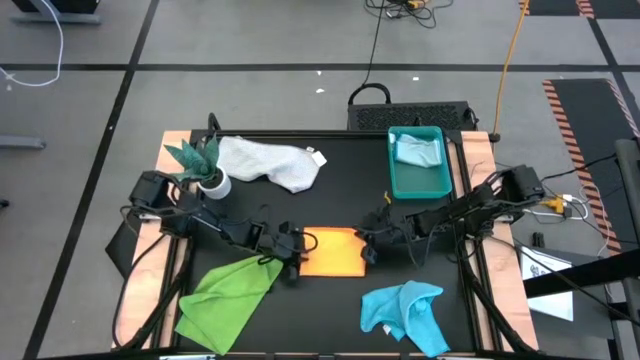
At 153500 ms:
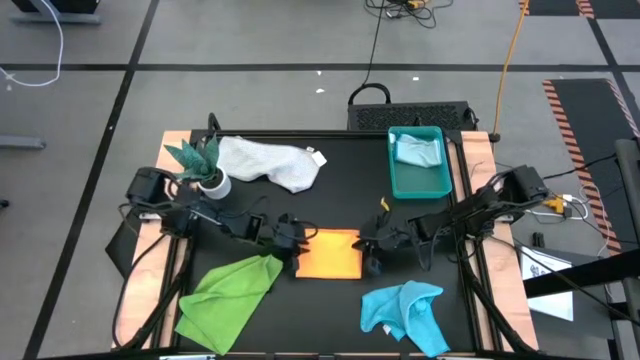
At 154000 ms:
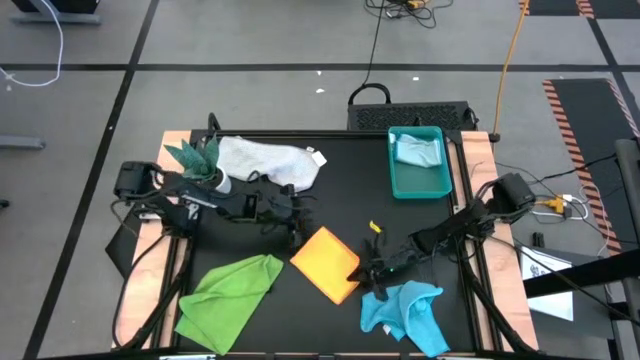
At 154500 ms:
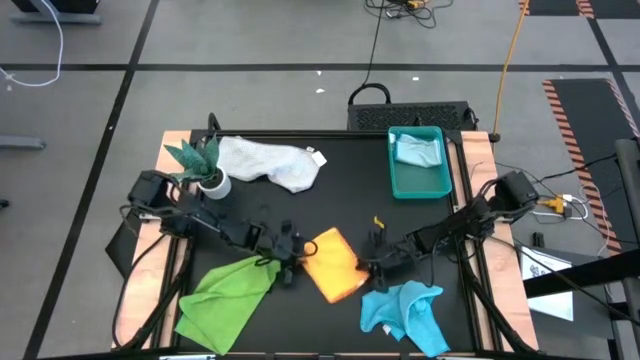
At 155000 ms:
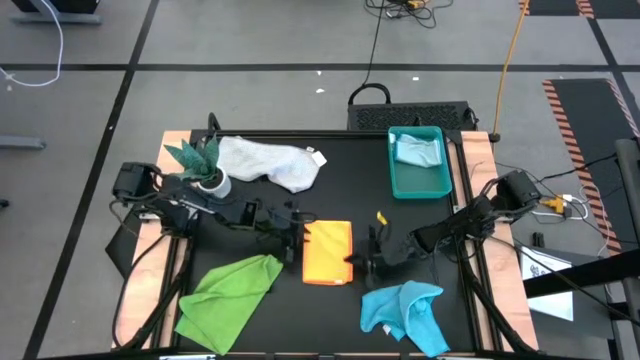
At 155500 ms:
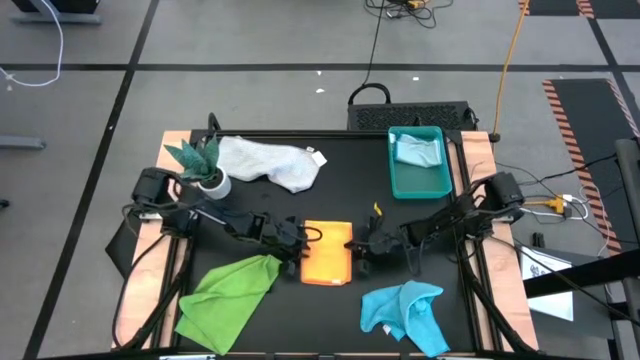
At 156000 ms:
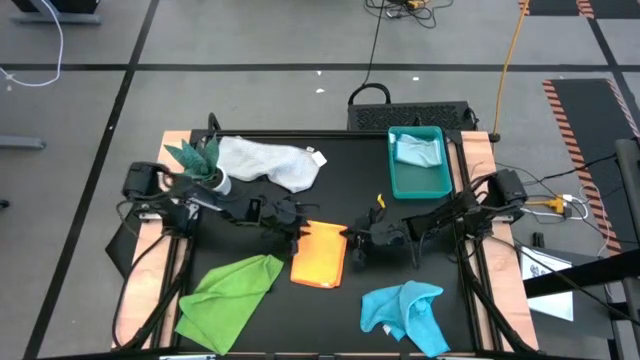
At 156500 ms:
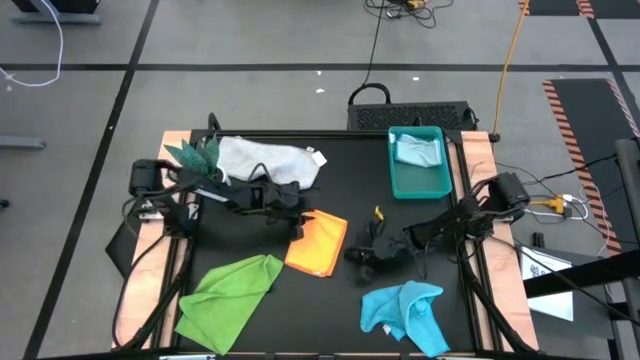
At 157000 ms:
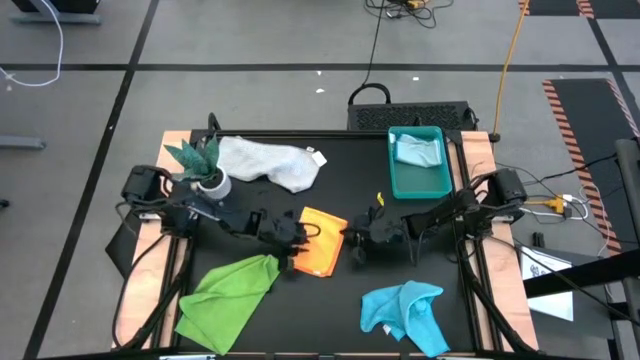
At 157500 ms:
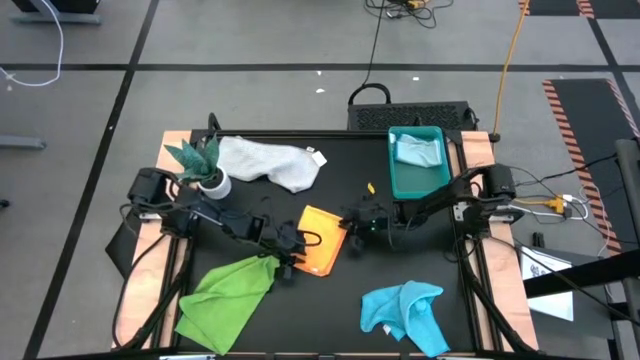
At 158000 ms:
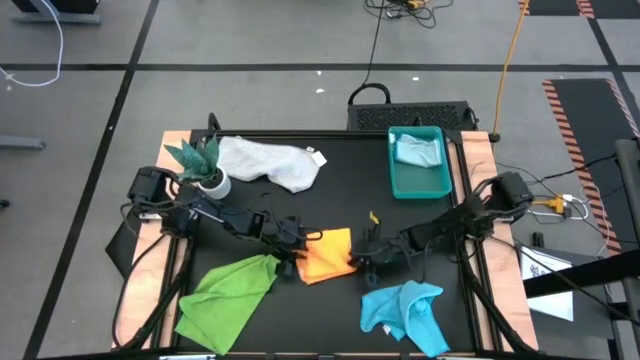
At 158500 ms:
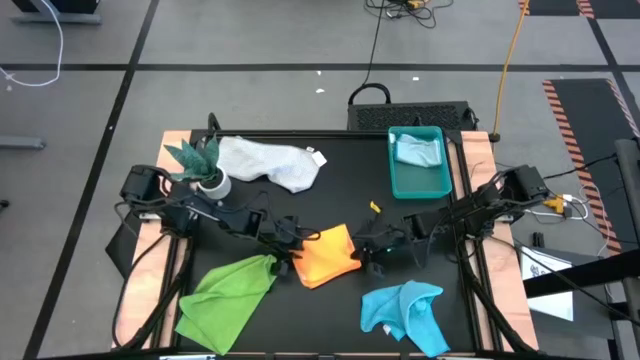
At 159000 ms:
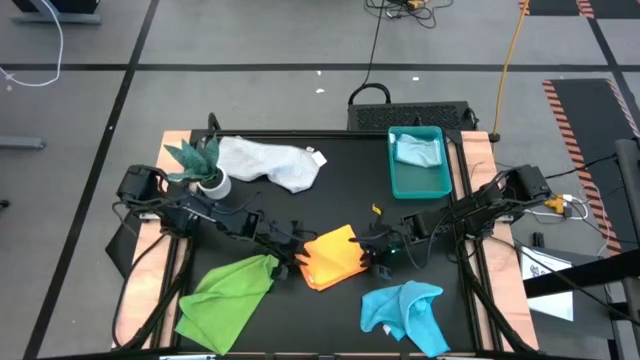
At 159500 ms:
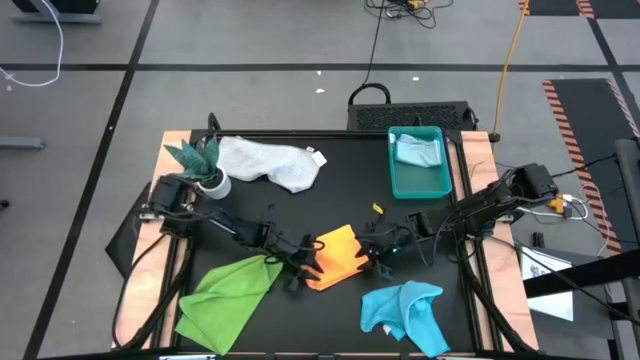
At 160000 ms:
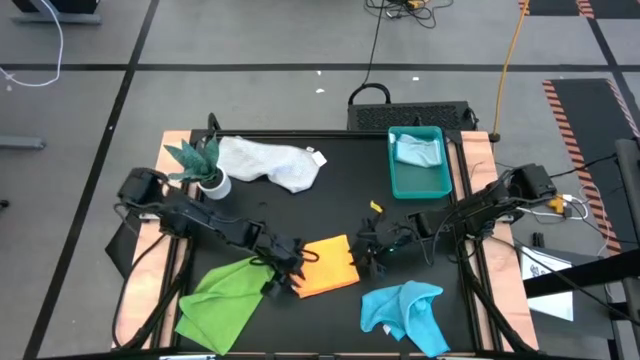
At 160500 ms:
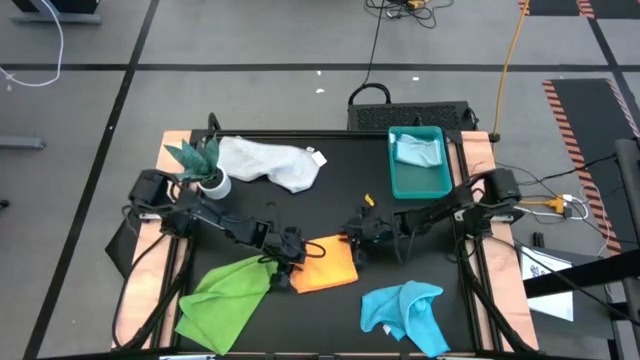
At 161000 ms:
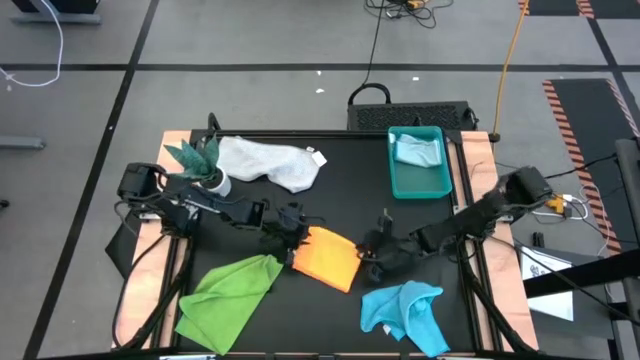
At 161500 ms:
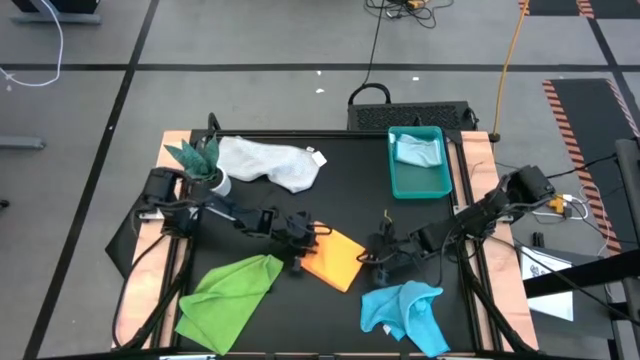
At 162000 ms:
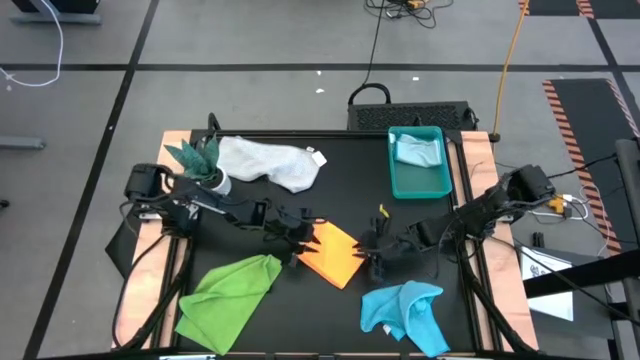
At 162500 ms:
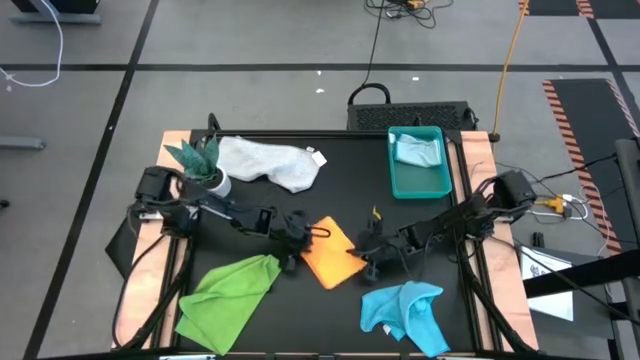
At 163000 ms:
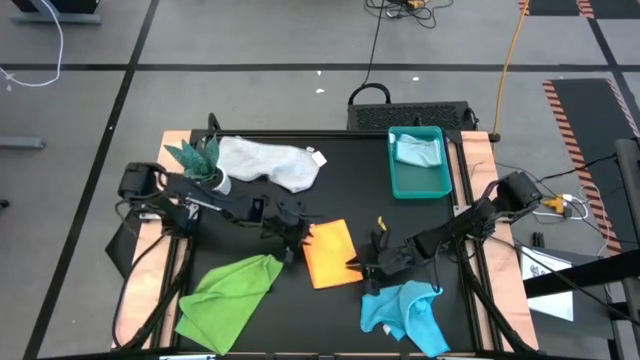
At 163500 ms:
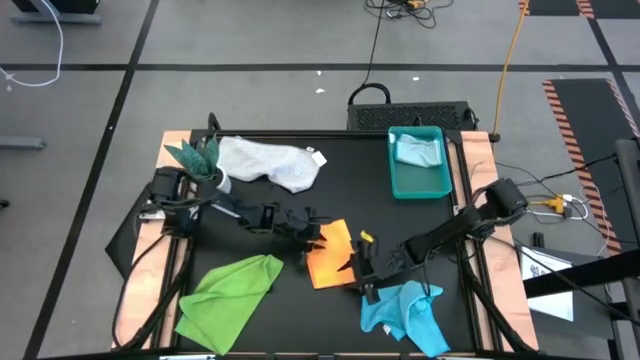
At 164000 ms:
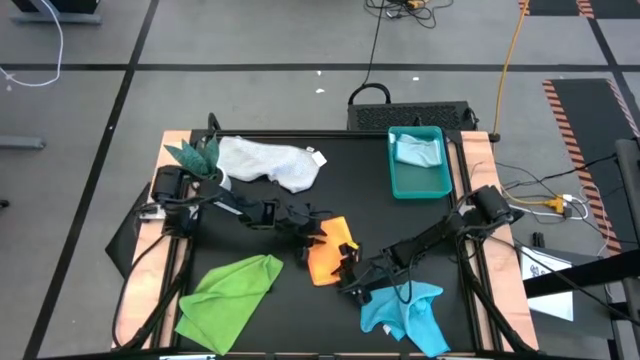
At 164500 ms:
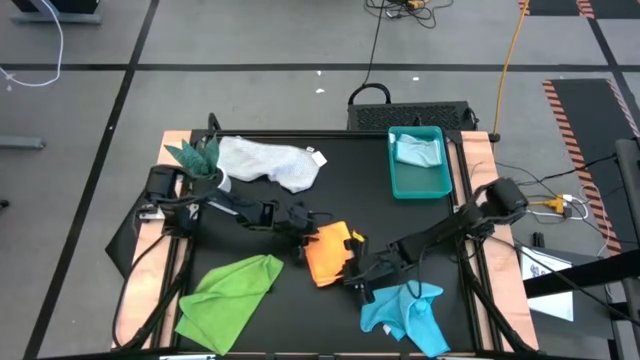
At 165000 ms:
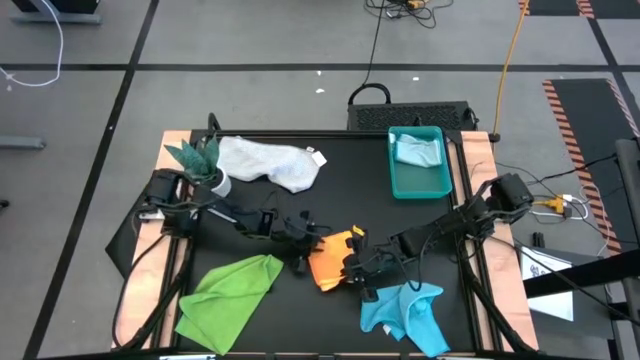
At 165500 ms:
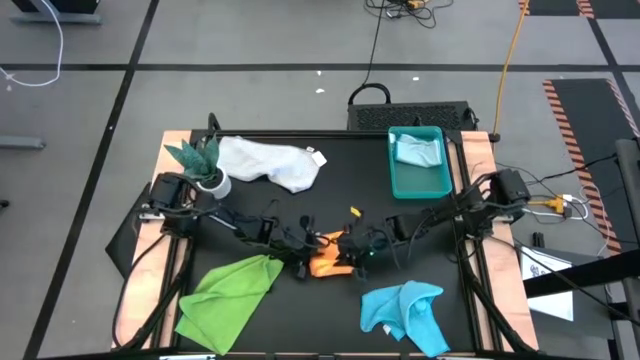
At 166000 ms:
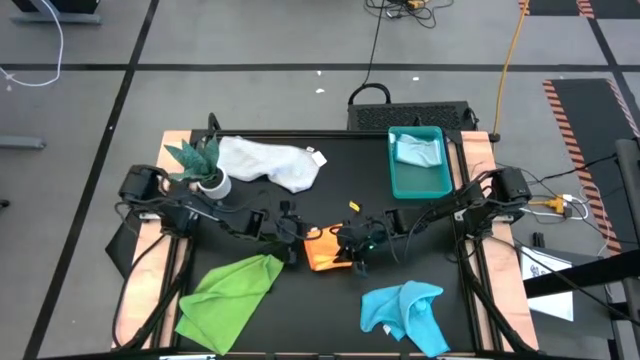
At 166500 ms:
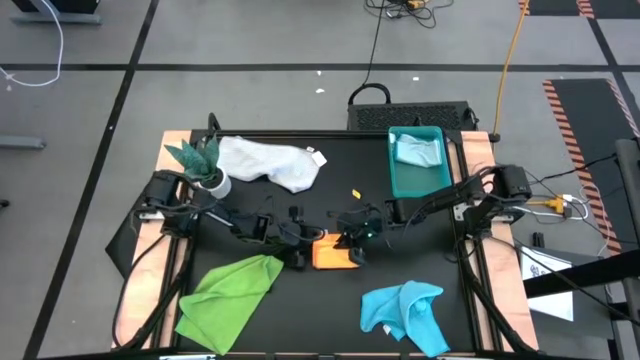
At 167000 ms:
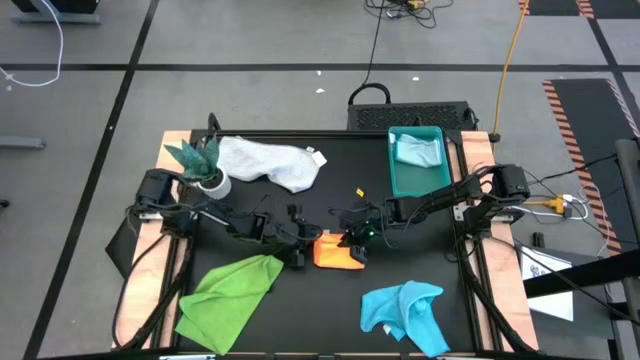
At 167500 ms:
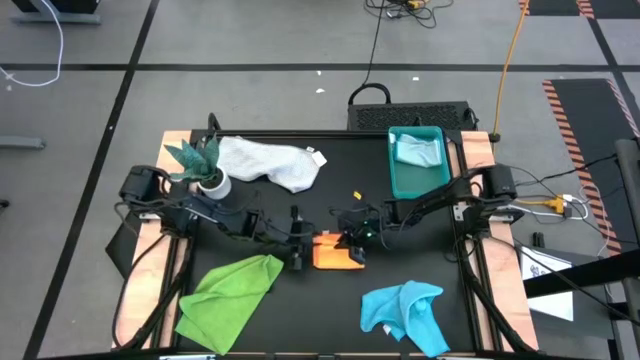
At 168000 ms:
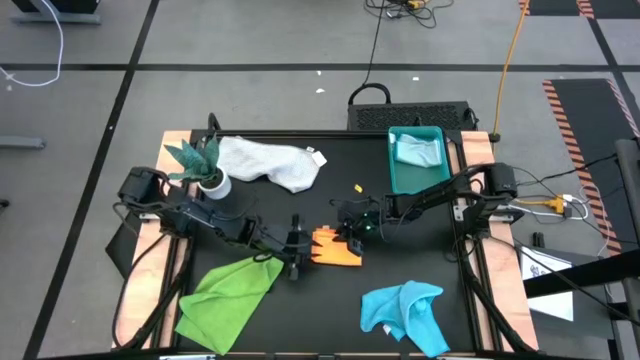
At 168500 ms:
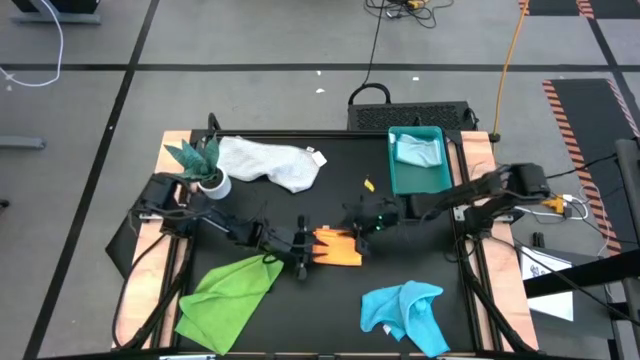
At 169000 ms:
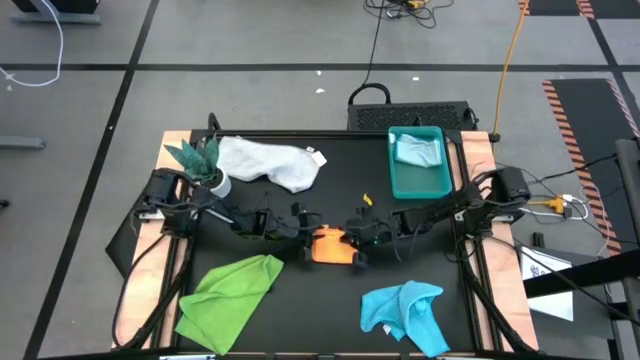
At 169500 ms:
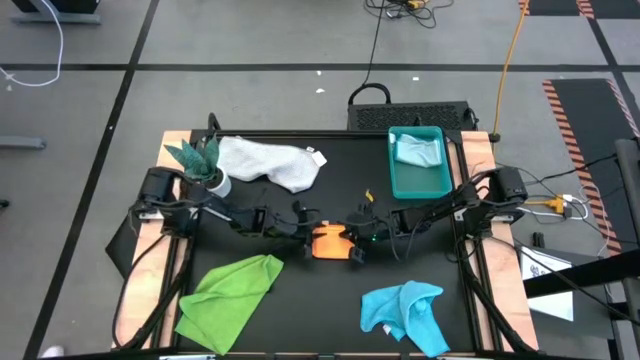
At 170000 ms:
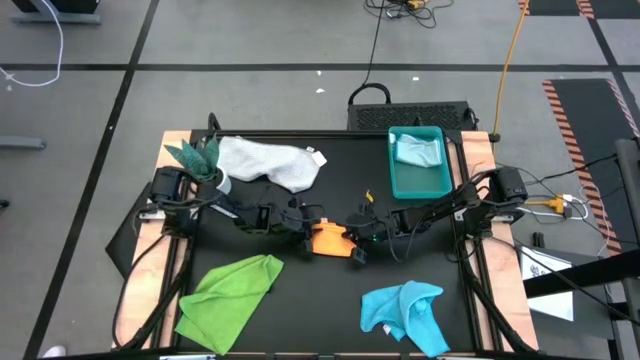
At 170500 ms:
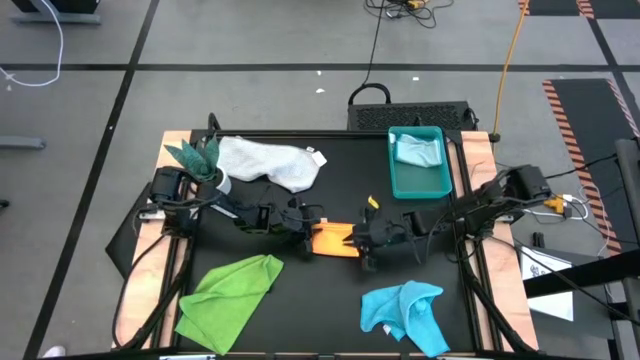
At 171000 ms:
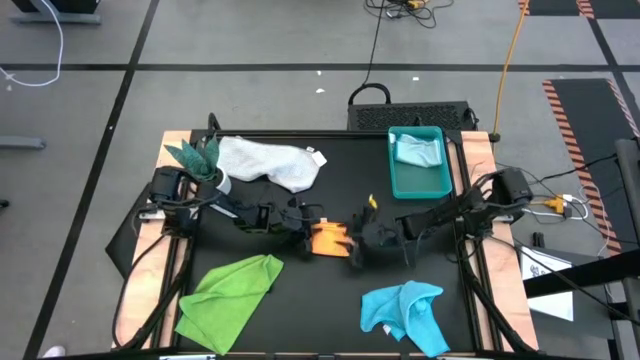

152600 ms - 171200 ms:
Task: Fold microfiber towels
Fold the orange microfiber cloth

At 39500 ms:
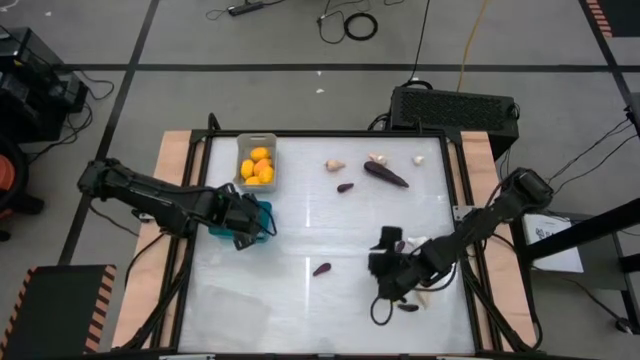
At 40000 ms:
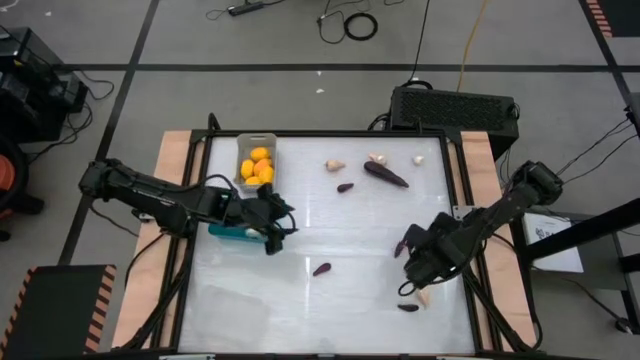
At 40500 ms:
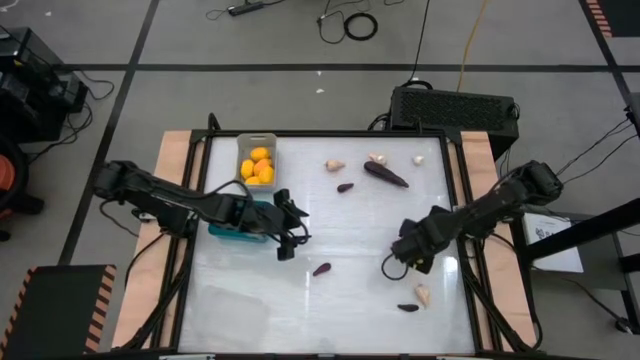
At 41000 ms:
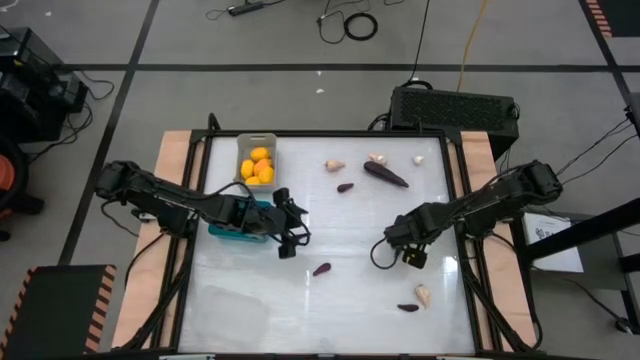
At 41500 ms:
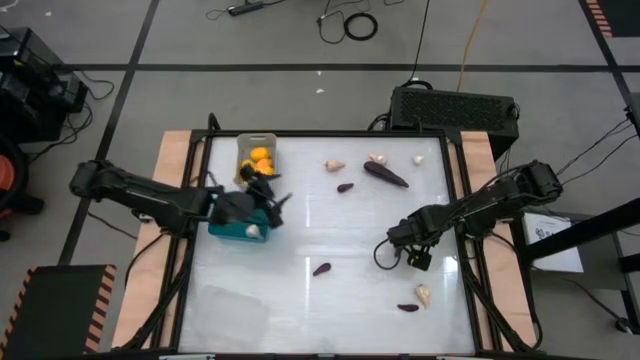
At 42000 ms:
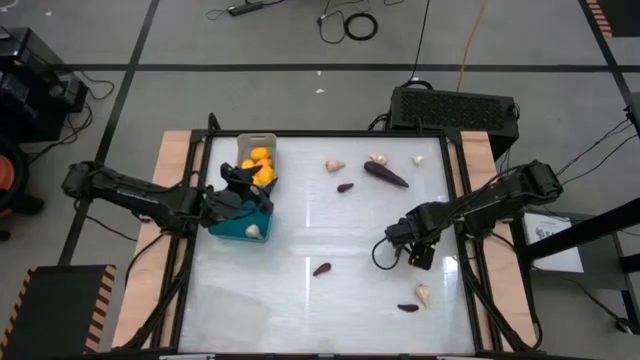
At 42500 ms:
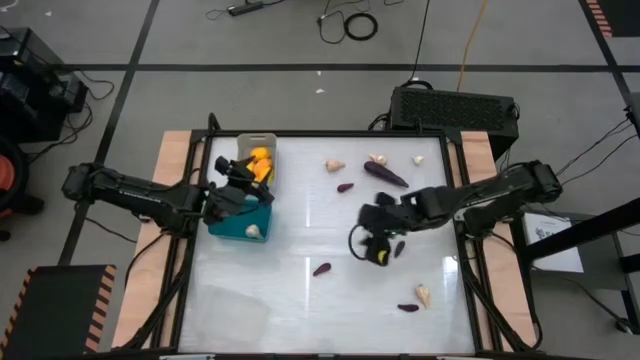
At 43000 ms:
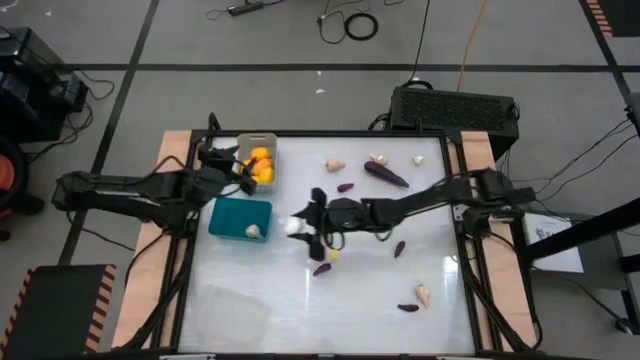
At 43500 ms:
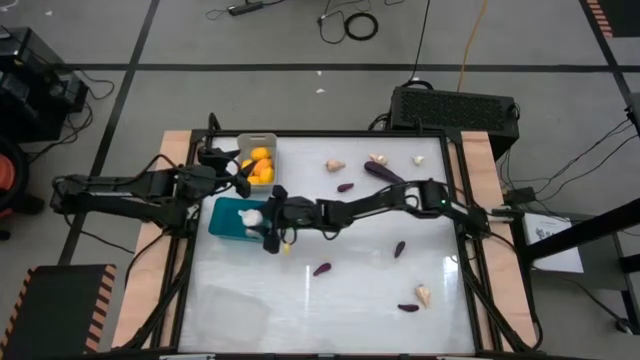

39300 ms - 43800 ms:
Task: Sort produce into baskets
Put the white garlic into the blue bin
